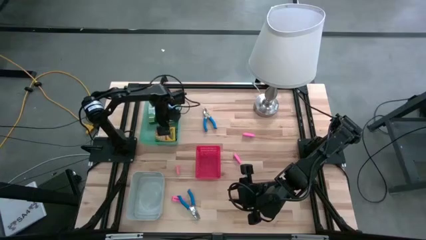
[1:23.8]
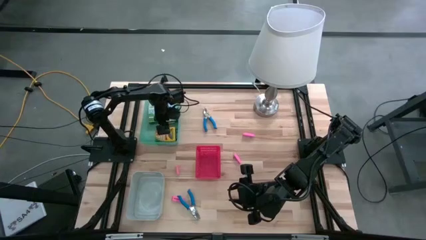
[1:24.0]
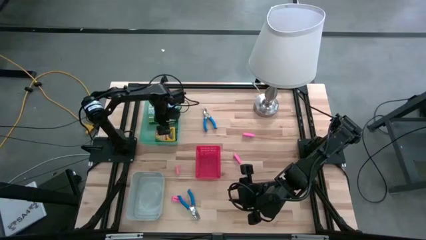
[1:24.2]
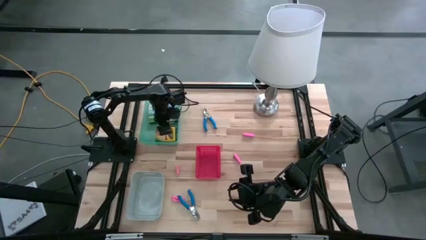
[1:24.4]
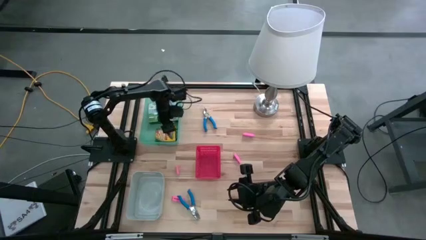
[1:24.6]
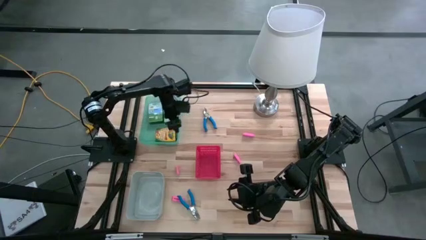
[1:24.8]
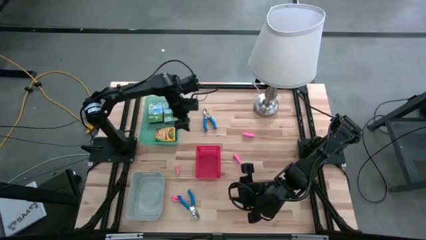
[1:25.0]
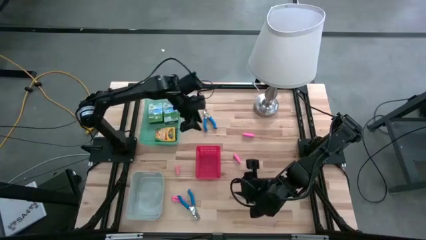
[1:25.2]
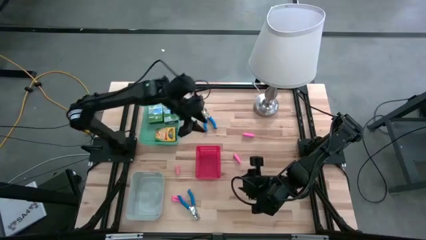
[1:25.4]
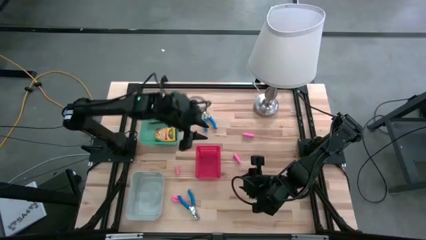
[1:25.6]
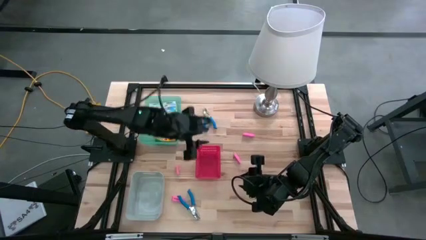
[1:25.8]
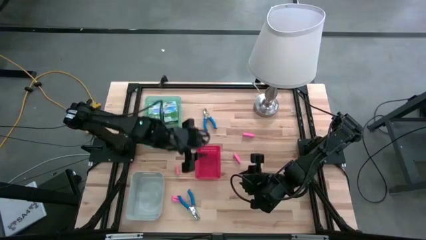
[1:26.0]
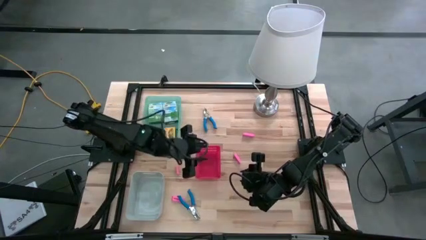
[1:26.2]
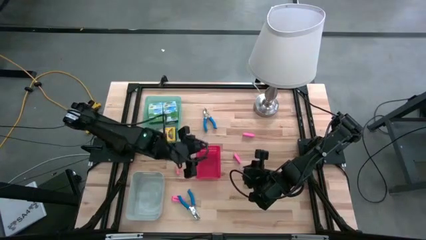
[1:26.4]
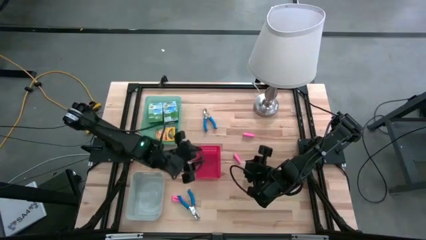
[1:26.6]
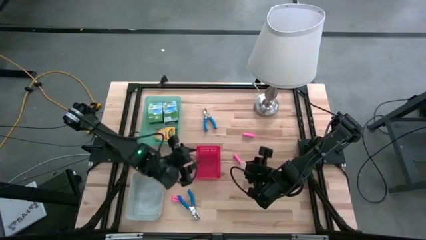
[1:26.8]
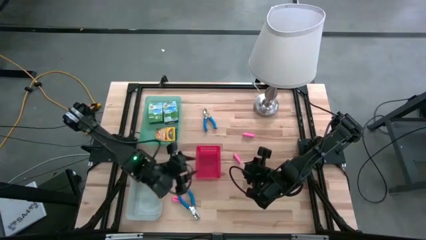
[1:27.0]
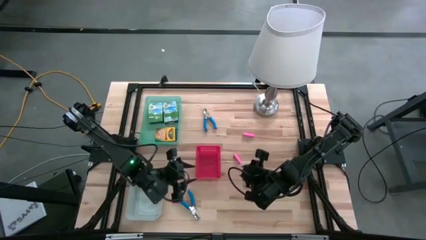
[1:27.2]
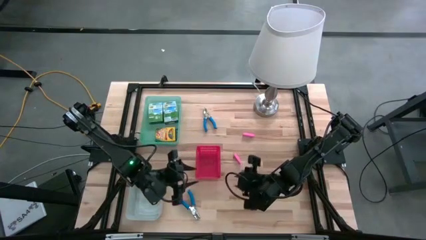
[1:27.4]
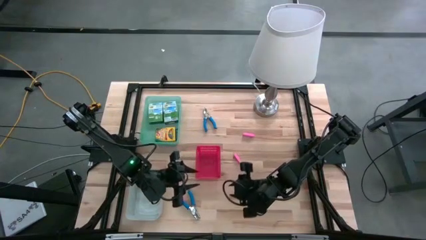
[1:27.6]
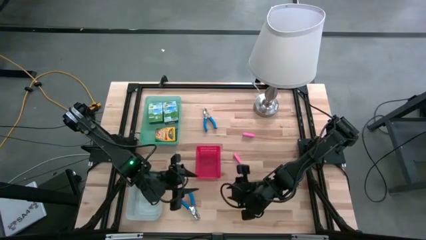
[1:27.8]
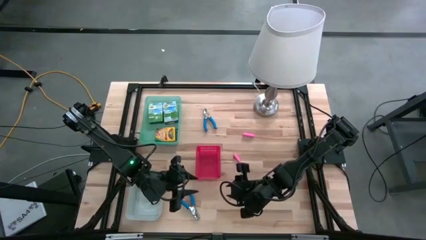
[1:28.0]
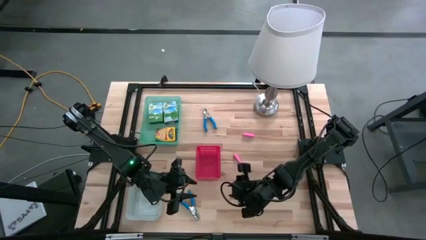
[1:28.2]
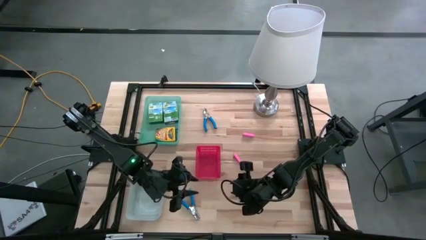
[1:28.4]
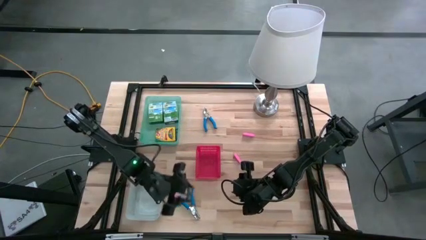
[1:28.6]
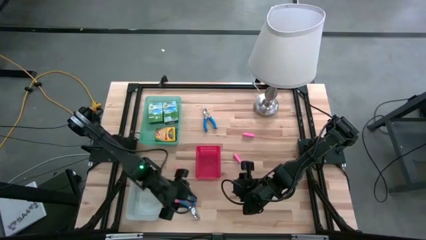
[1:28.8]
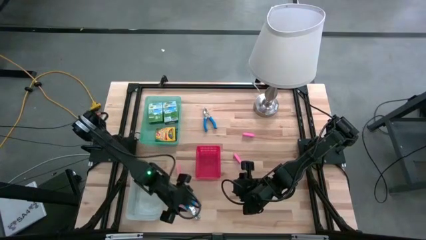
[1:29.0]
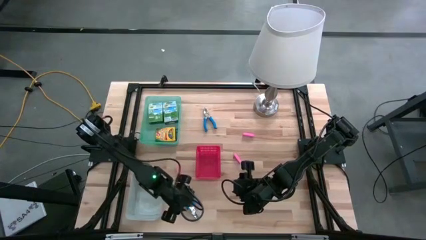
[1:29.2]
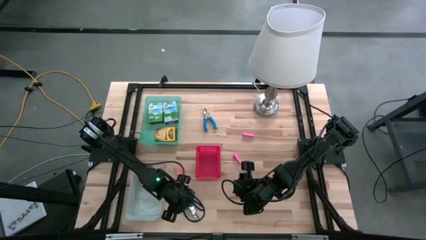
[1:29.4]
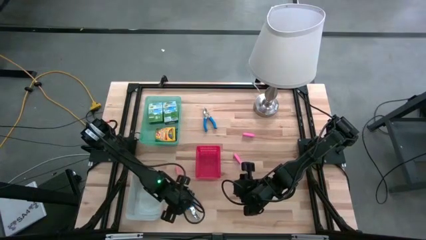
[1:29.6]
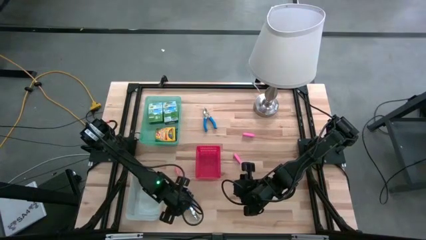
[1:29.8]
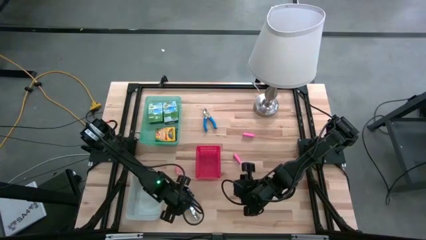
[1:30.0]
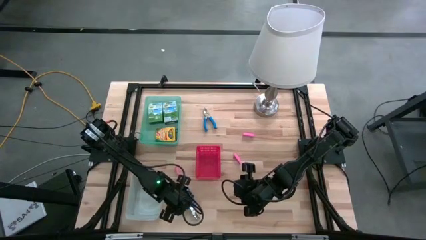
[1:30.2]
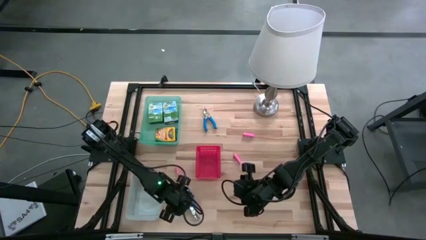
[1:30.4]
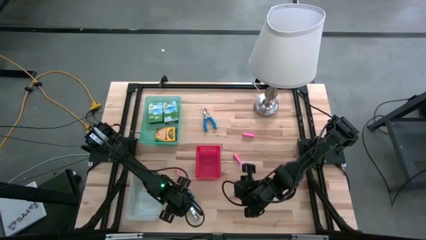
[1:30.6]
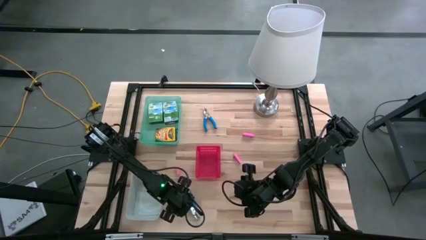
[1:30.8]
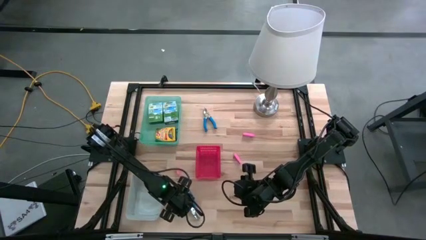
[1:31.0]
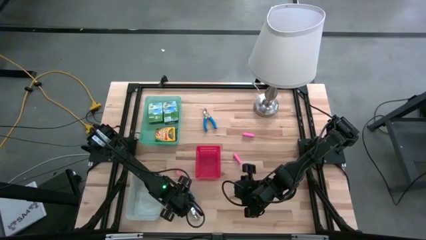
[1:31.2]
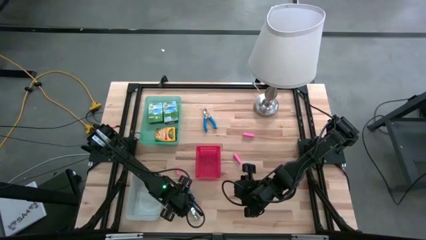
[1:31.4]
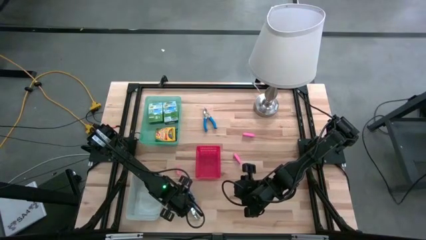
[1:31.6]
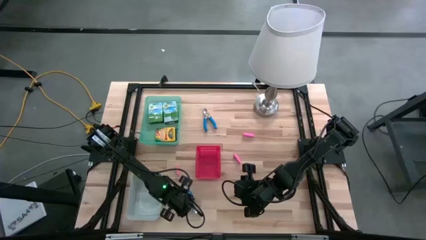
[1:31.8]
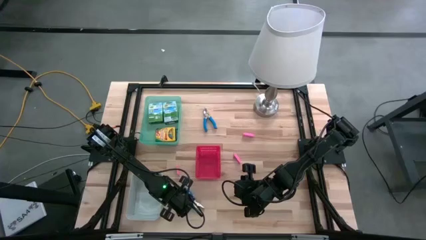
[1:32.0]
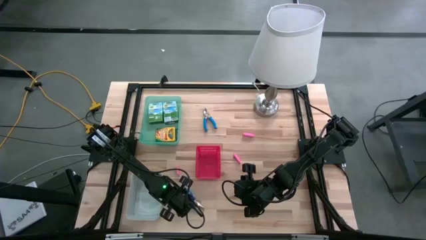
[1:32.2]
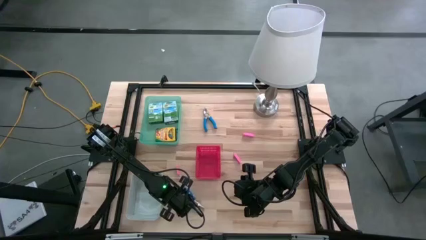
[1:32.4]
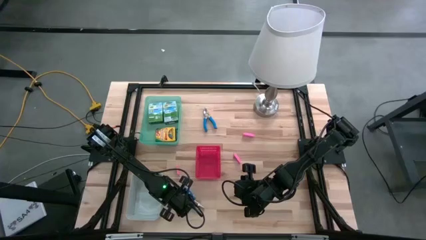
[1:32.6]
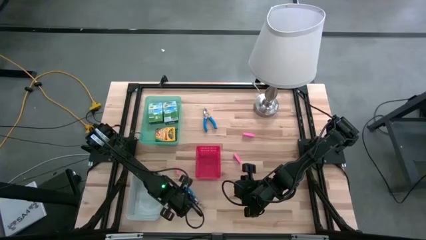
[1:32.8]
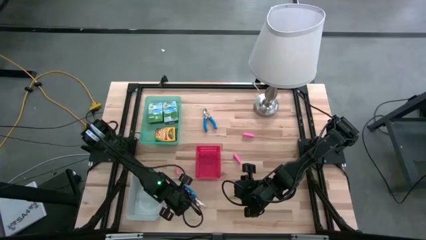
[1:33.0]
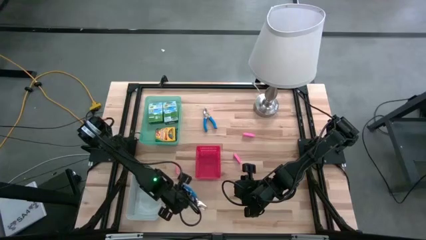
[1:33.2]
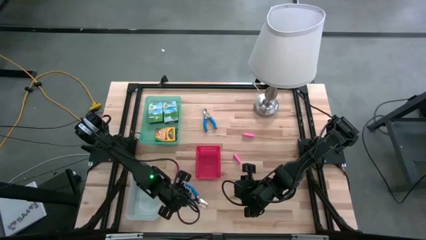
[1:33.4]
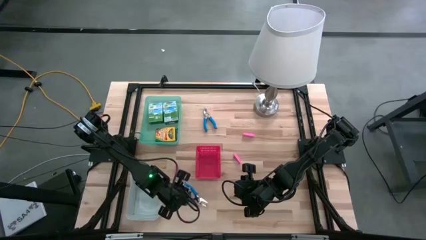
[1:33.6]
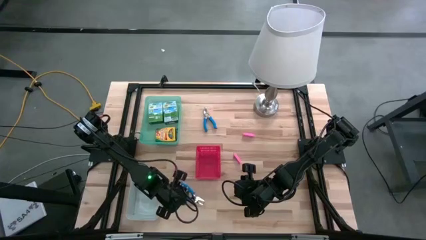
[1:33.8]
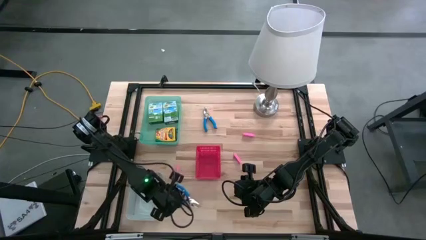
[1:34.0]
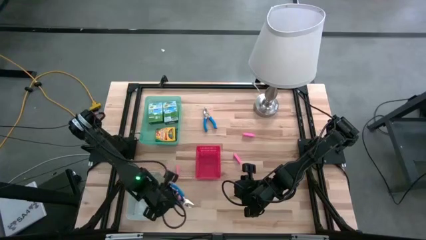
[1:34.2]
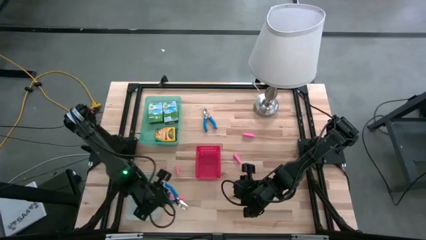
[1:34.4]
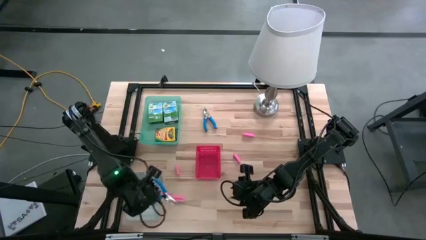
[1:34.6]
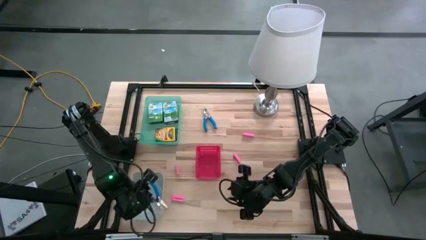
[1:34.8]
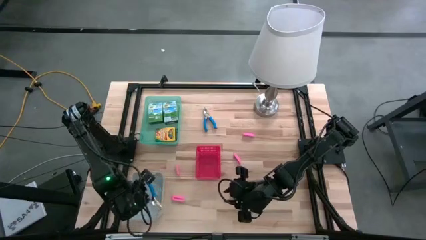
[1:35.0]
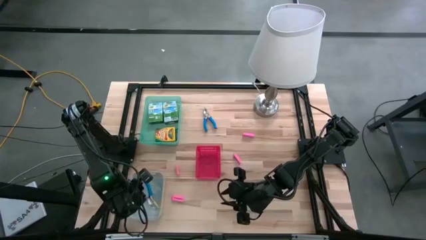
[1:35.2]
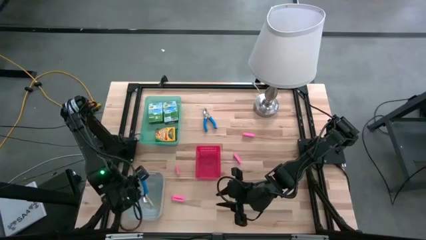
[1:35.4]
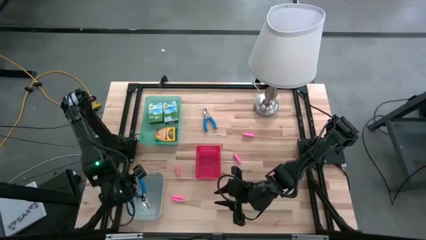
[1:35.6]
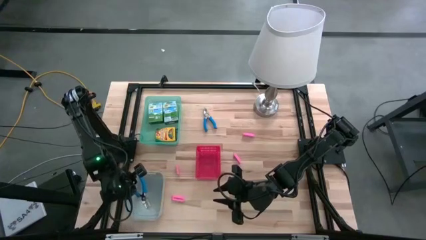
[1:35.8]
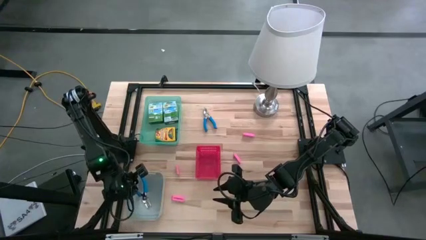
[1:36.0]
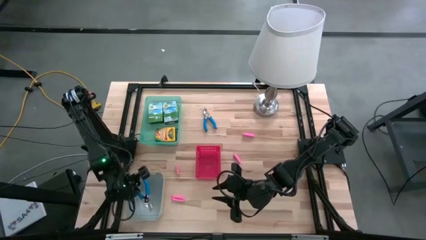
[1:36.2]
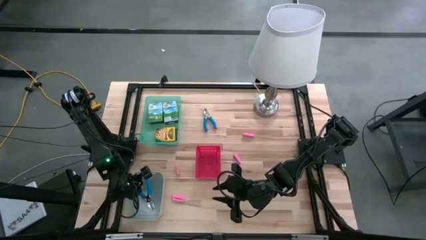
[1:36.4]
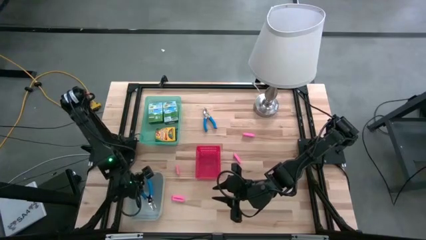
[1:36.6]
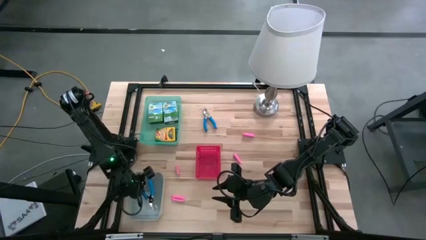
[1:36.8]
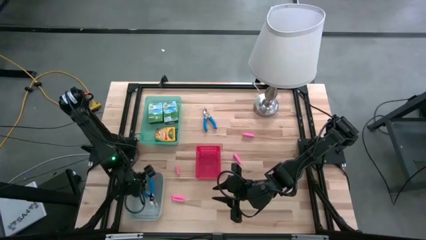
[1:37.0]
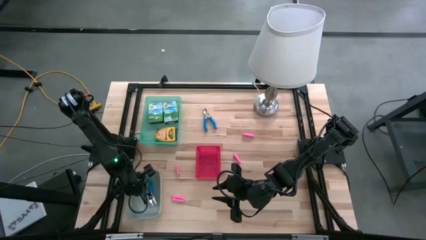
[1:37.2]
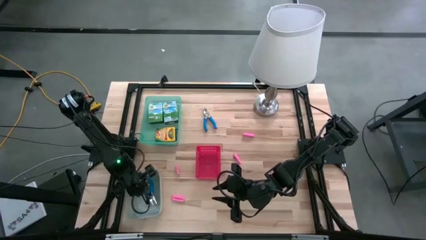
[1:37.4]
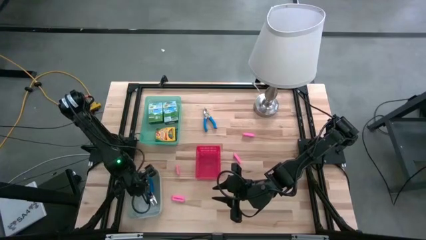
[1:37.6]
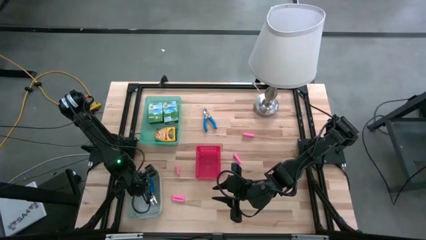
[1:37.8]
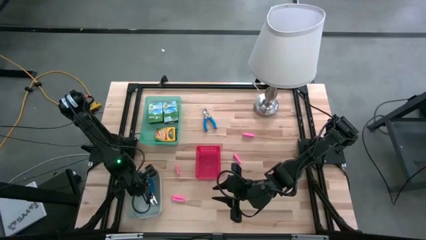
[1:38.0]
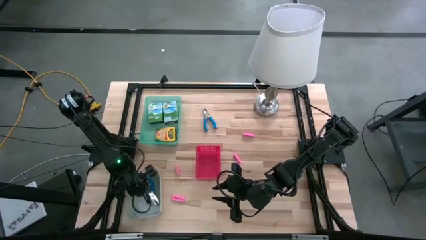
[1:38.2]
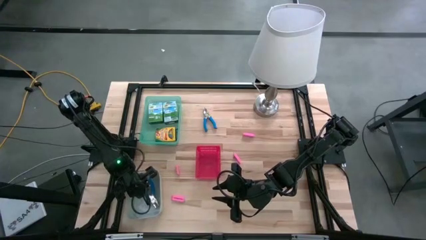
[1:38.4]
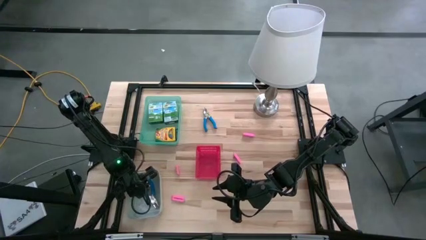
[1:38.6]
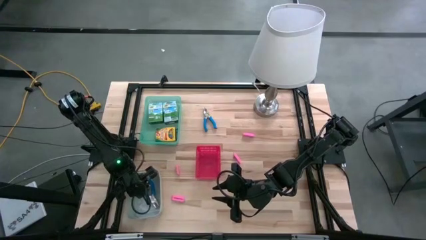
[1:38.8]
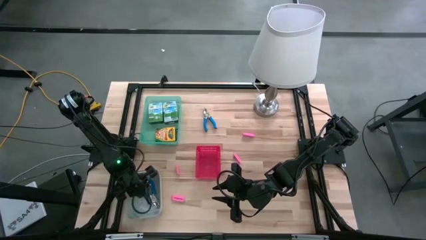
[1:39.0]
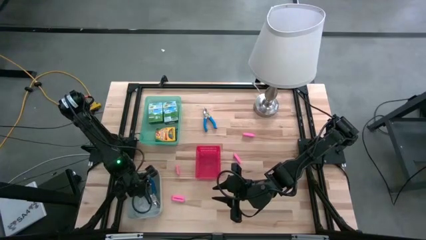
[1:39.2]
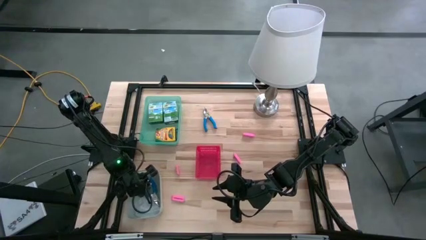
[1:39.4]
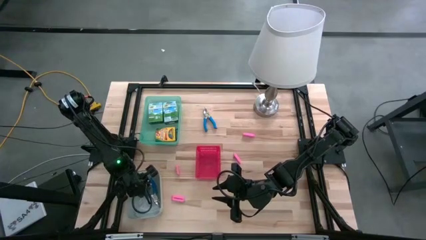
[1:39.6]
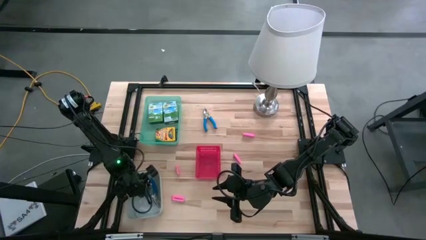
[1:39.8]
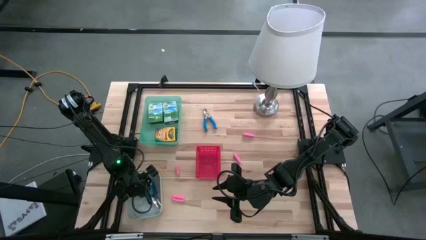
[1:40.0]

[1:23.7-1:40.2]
Task: Pick & Place School Supplies
Put the bottom blue hole puncher into the grey bin
